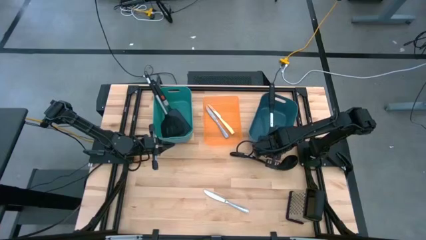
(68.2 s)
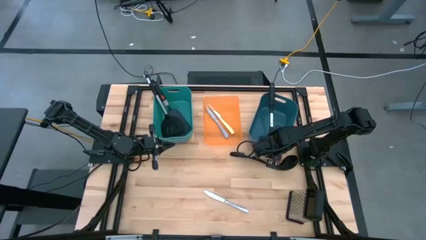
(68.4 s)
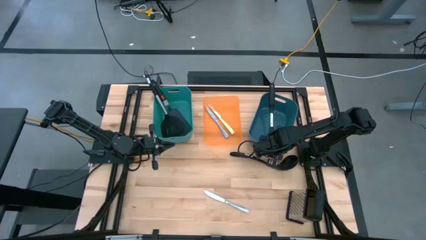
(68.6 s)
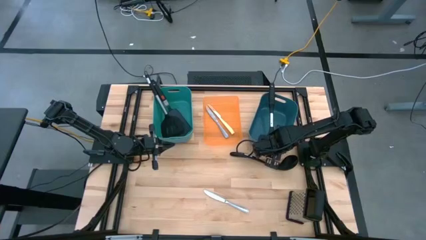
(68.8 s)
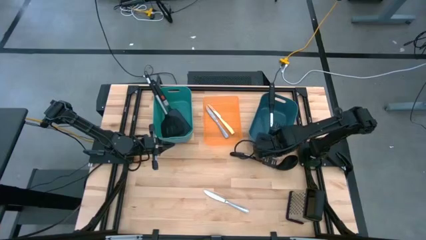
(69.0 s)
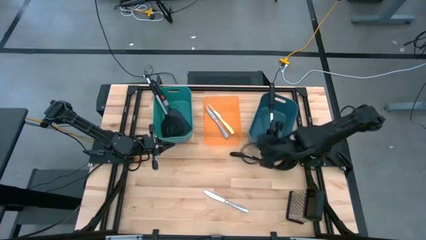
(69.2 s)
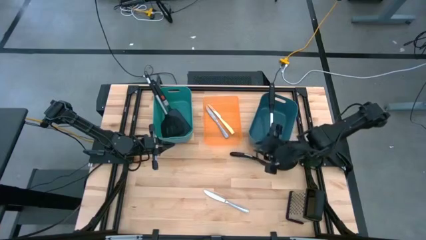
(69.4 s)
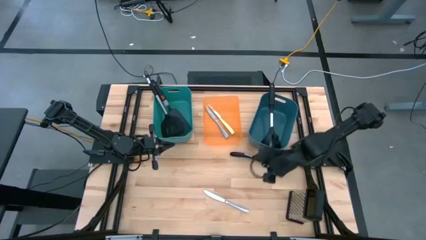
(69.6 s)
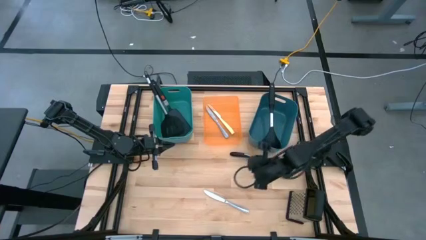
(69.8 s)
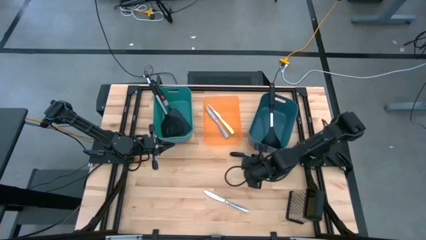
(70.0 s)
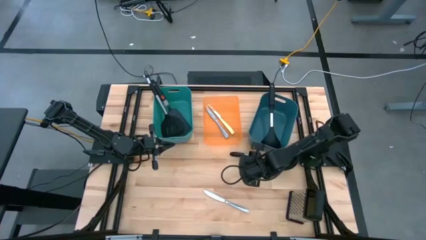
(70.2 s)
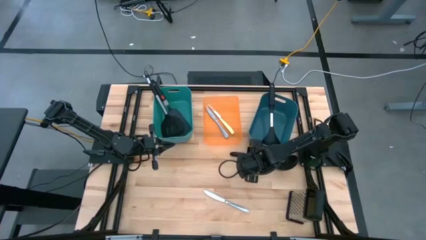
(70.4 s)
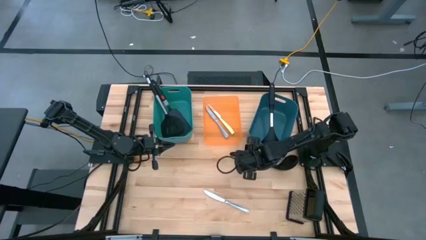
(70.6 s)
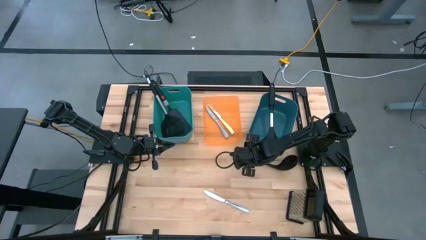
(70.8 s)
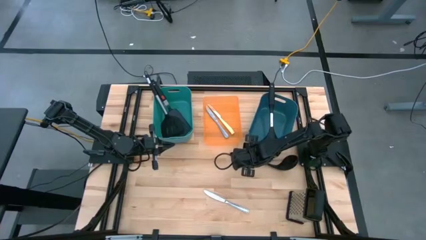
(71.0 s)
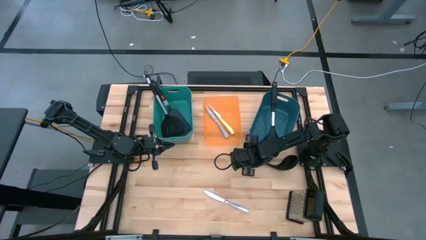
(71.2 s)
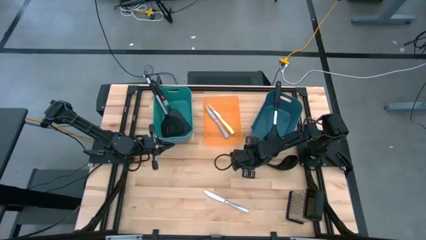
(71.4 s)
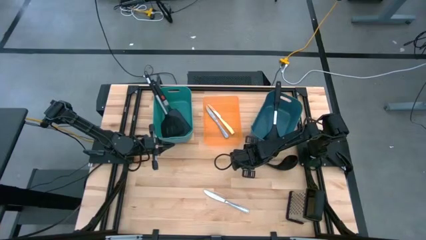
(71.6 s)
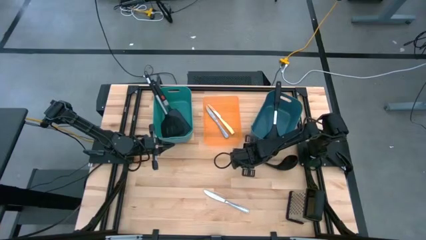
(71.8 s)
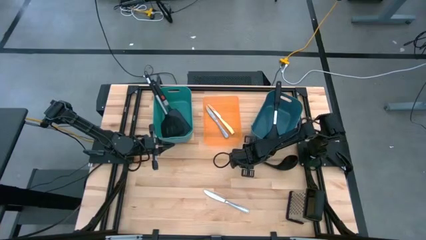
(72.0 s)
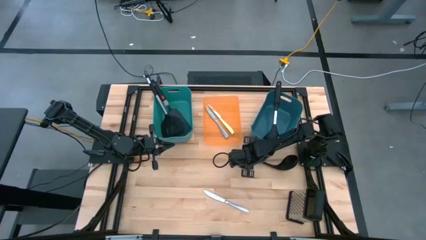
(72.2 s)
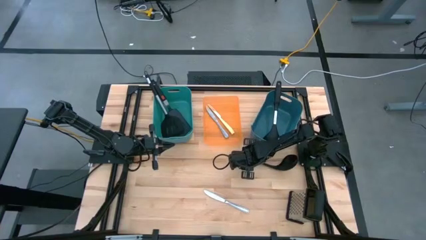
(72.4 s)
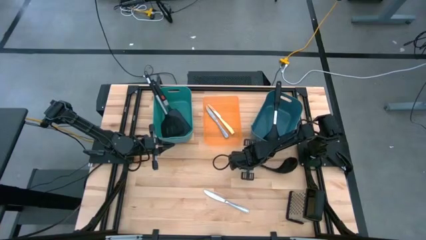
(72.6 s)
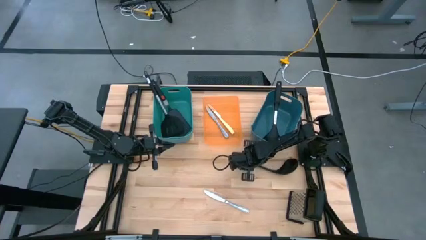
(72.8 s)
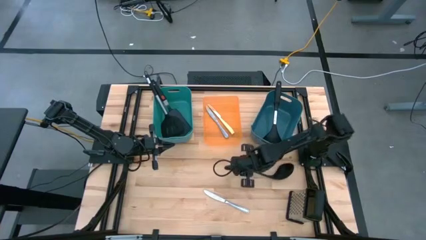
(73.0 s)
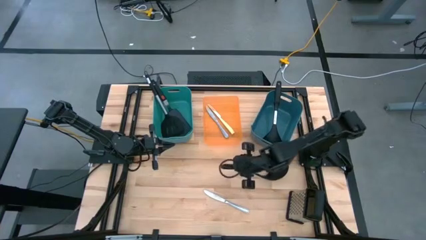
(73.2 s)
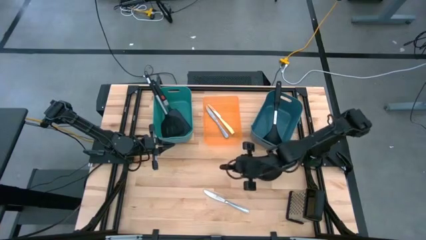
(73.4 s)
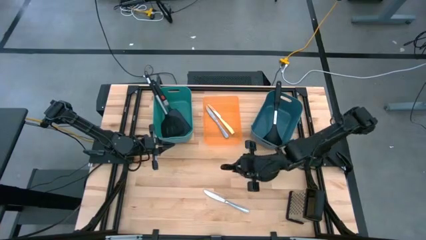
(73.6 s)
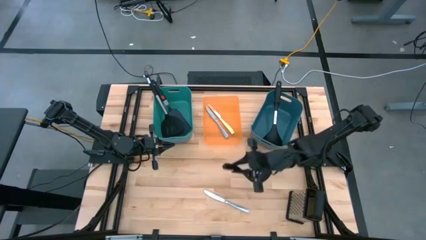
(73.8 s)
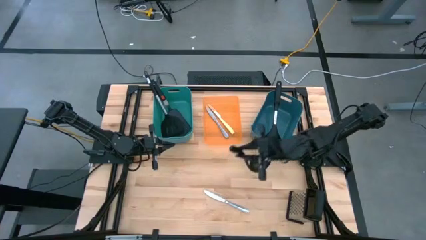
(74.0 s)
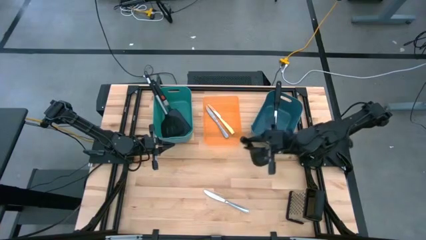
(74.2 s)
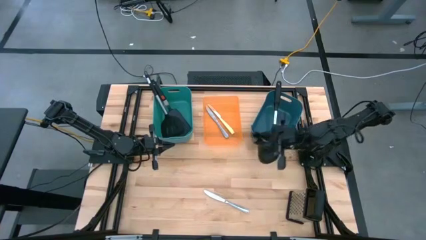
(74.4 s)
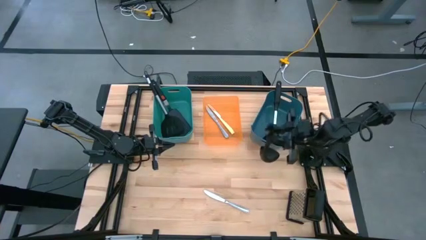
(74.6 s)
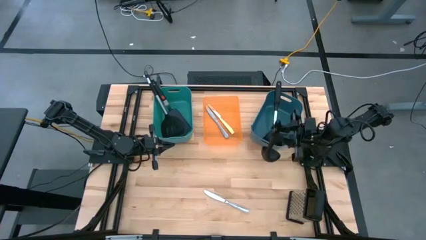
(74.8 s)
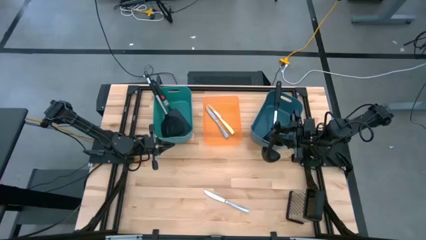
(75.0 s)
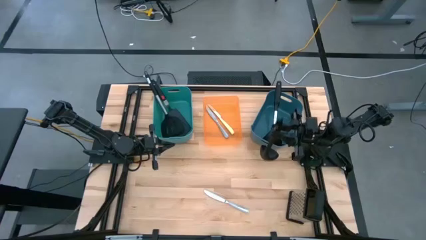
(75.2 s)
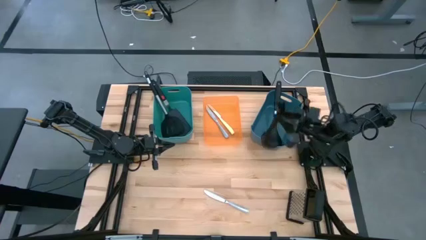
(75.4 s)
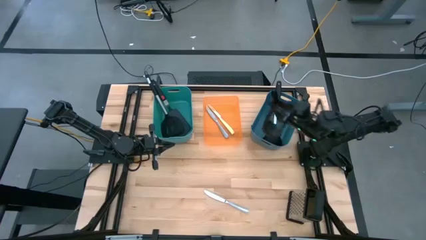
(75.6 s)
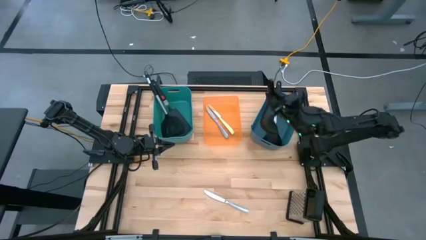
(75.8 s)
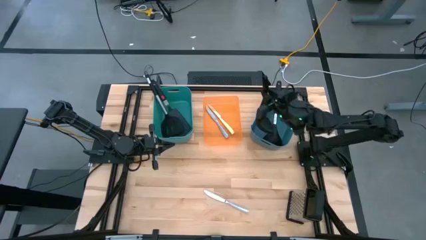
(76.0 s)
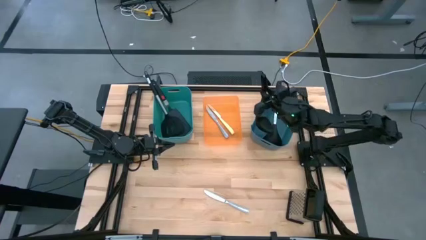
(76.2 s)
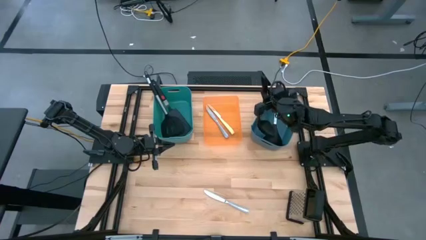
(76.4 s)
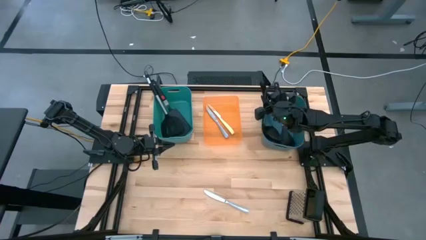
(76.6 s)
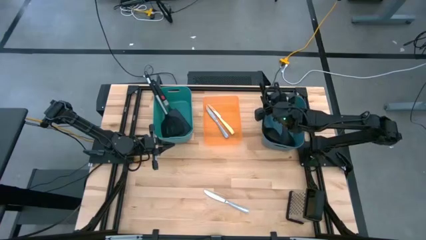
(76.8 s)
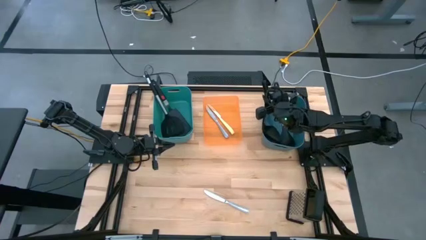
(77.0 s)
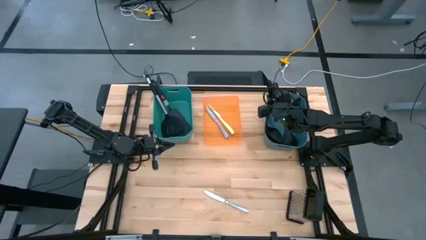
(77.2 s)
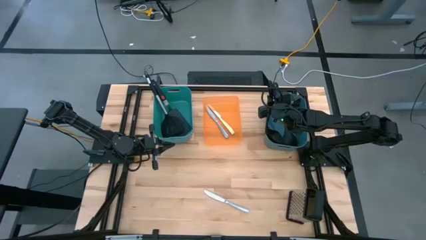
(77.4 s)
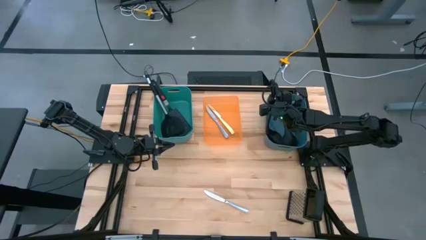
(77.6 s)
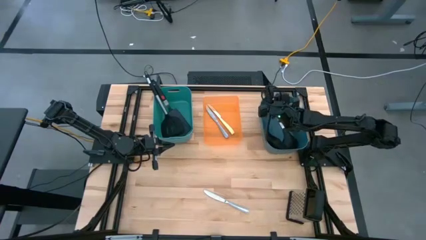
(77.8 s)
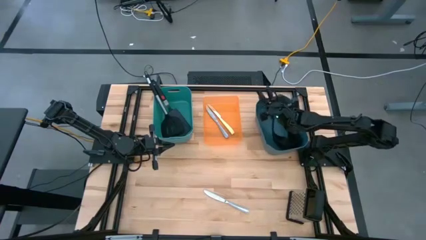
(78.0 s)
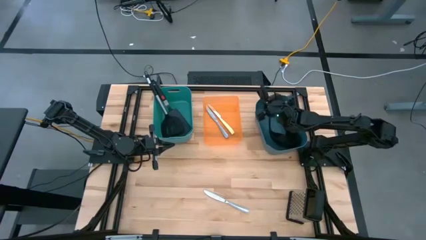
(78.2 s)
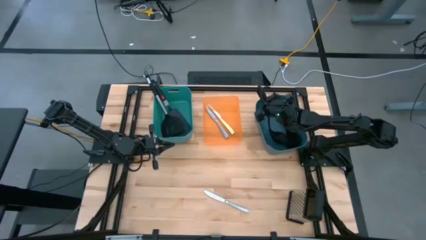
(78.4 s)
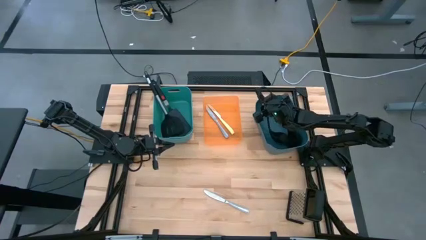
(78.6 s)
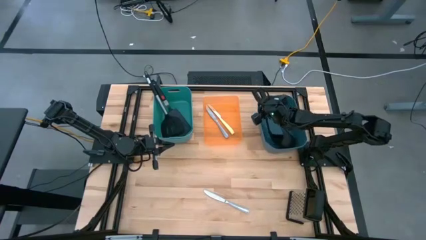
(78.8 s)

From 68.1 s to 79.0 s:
Task: Pick & Place Kitchen Items
Put the black serving spoon into the dark blue bin

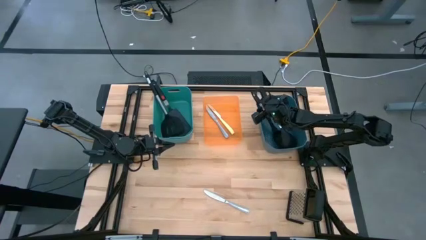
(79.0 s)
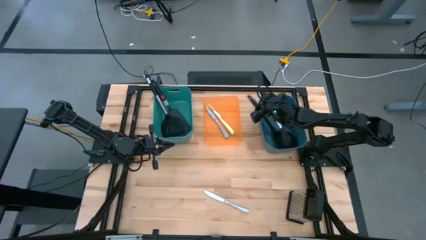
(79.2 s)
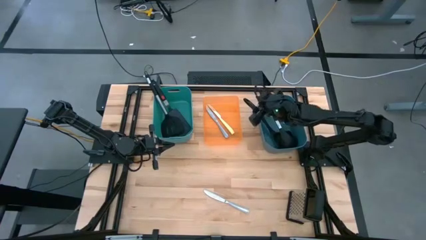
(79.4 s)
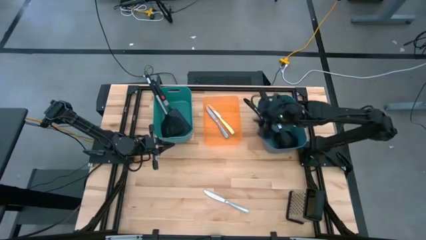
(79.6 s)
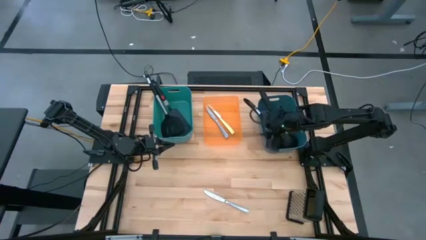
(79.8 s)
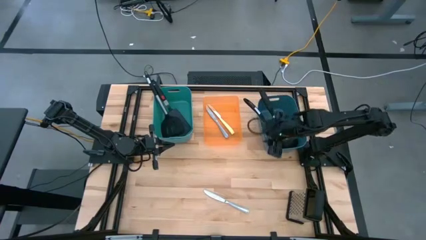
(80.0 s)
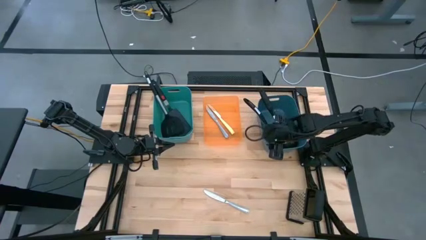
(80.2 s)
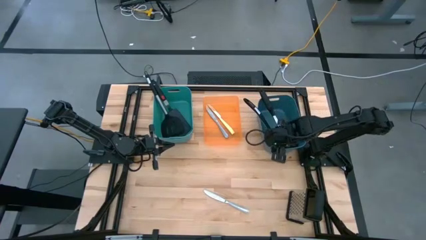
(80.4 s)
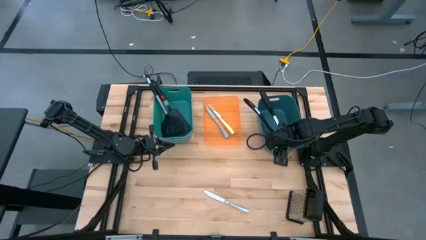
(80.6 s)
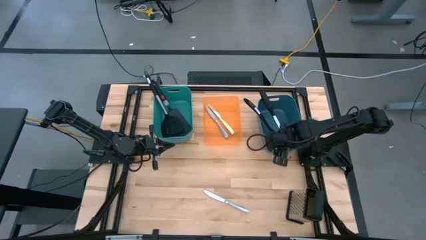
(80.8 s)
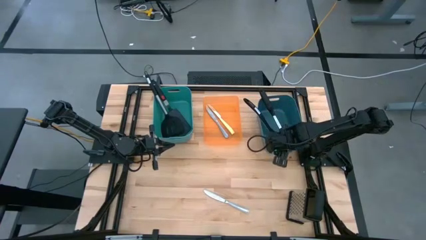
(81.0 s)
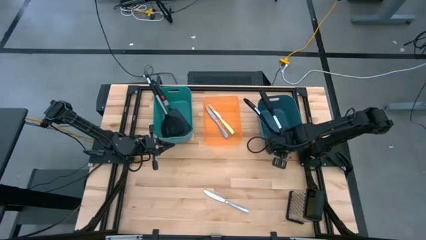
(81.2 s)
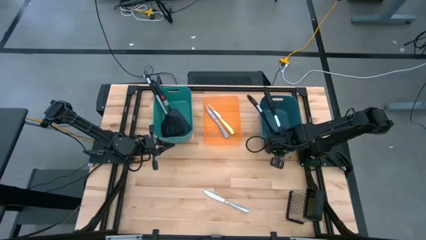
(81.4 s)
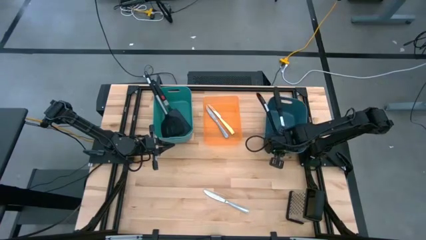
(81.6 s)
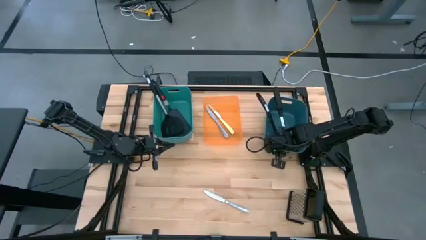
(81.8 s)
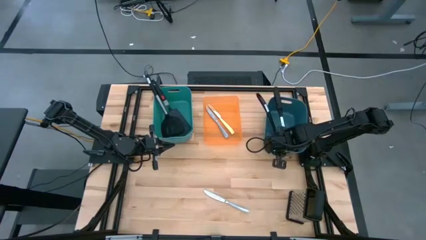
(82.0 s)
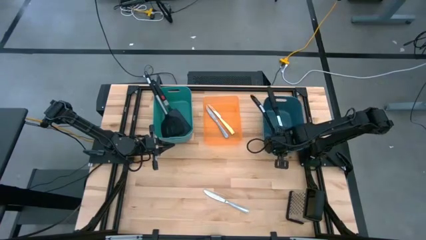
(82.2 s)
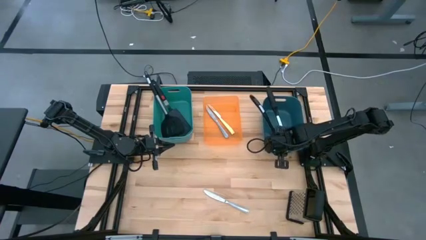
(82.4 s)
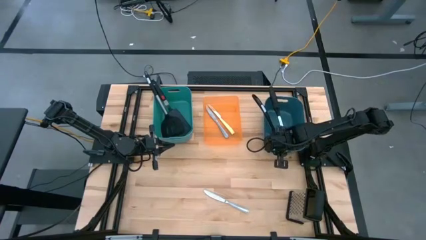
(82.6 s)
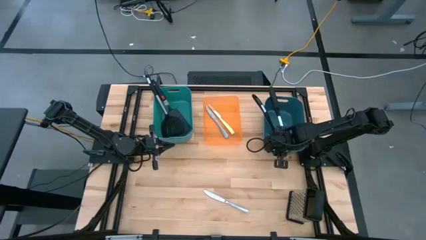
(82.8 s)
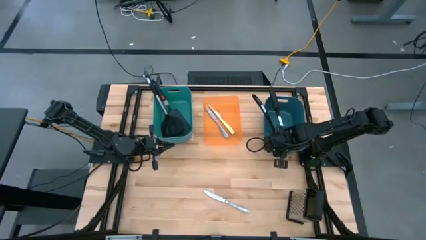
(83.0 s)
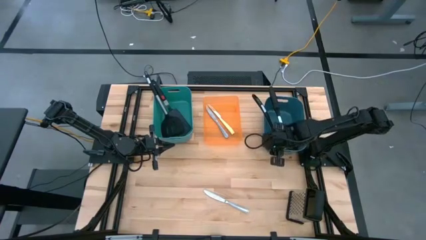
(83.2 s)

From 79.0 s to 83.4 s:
Adjust the dark blue bin
